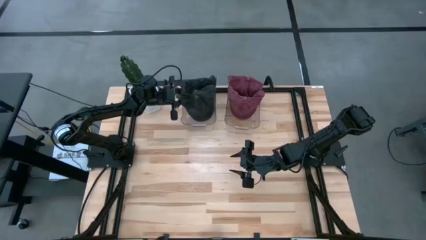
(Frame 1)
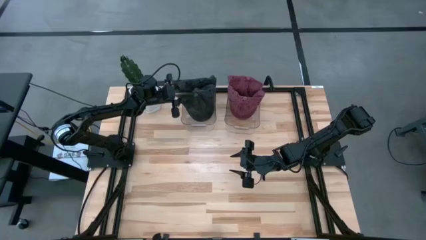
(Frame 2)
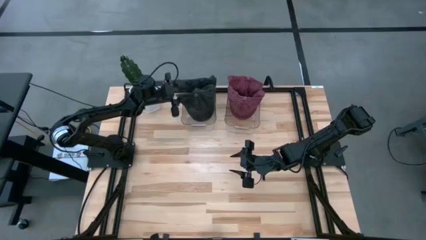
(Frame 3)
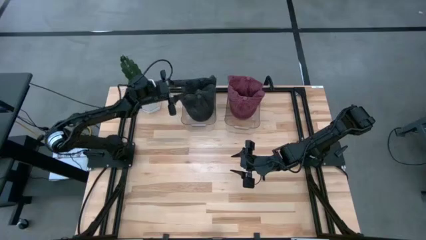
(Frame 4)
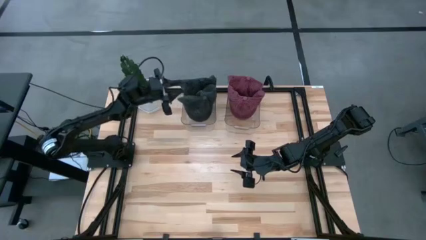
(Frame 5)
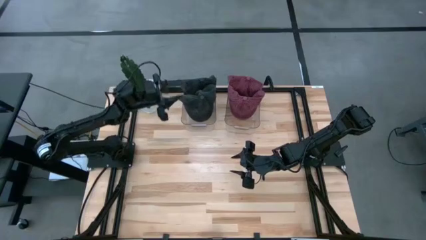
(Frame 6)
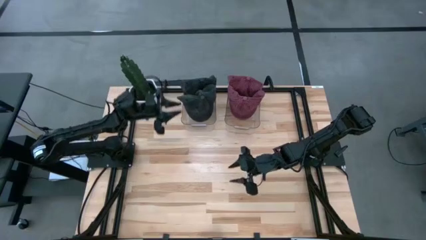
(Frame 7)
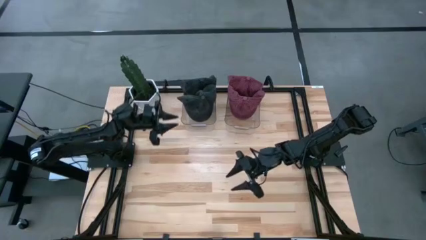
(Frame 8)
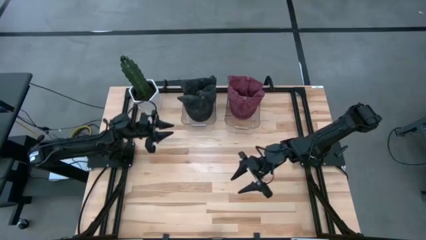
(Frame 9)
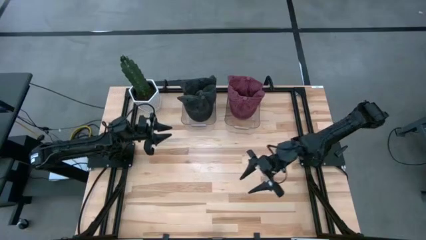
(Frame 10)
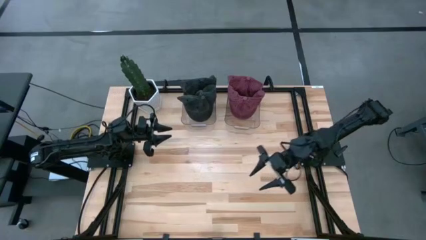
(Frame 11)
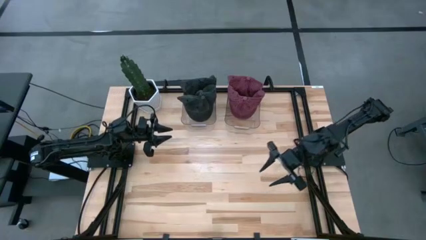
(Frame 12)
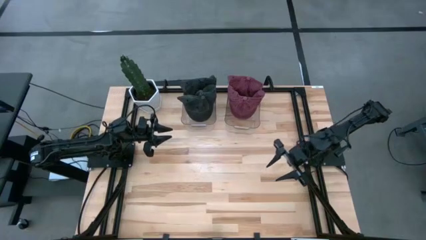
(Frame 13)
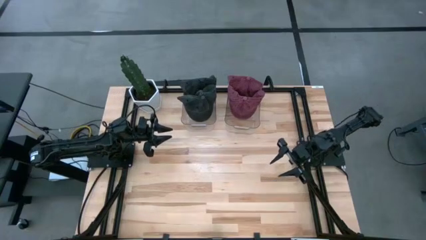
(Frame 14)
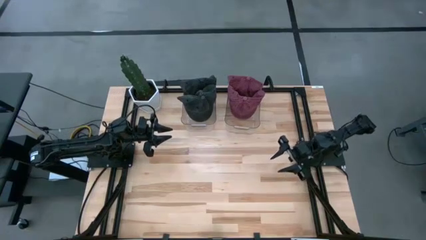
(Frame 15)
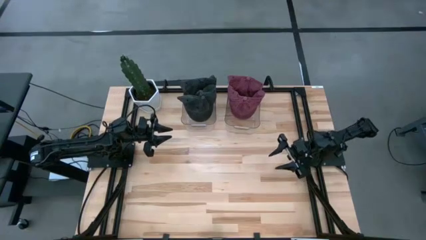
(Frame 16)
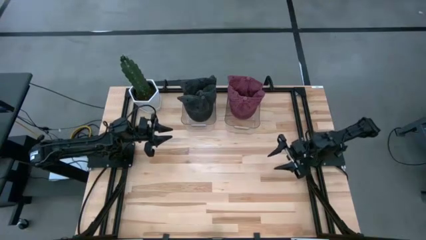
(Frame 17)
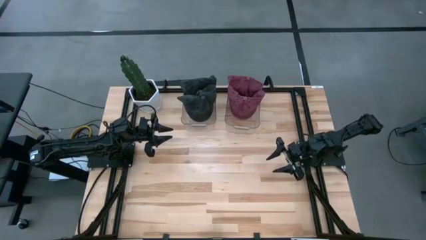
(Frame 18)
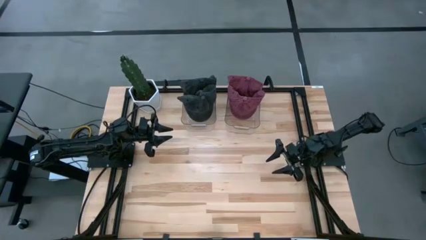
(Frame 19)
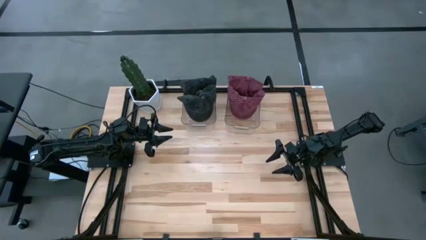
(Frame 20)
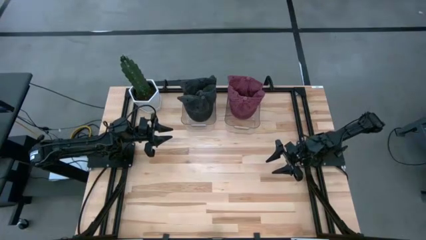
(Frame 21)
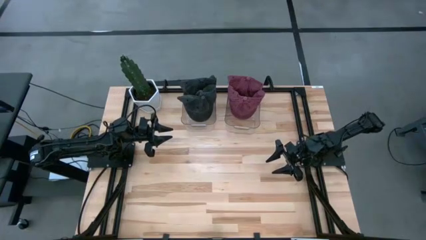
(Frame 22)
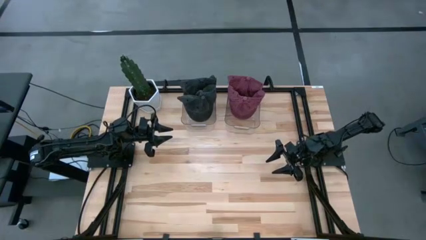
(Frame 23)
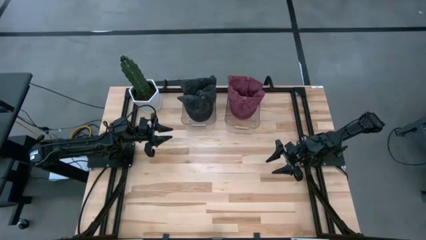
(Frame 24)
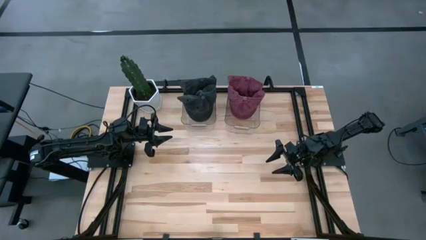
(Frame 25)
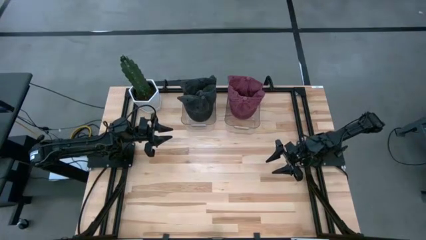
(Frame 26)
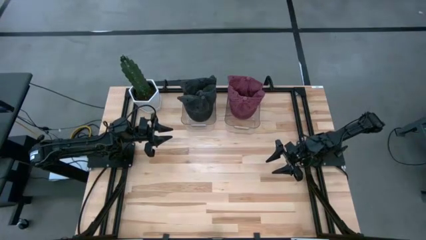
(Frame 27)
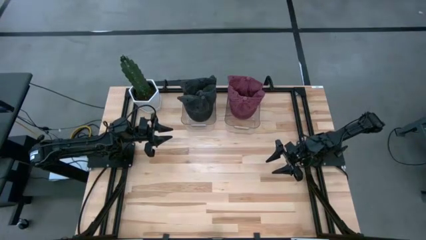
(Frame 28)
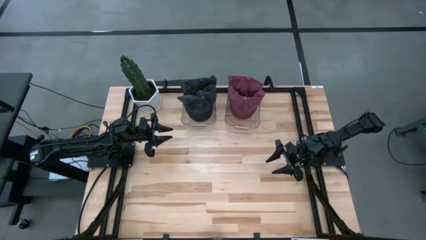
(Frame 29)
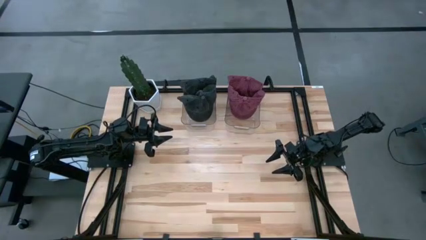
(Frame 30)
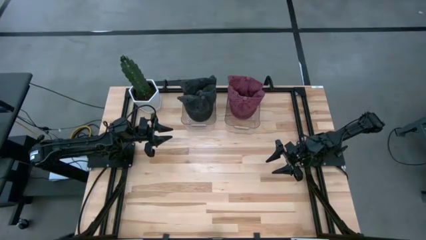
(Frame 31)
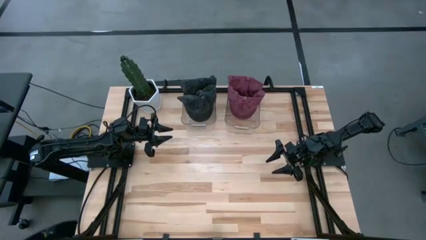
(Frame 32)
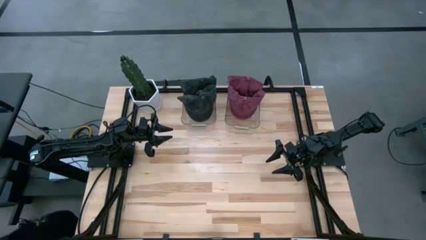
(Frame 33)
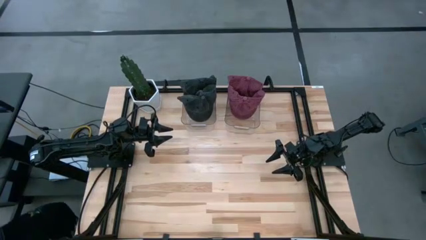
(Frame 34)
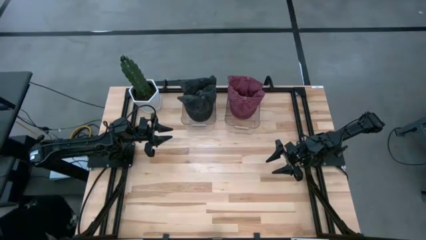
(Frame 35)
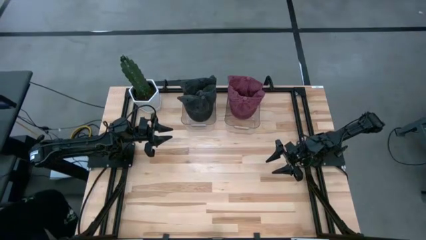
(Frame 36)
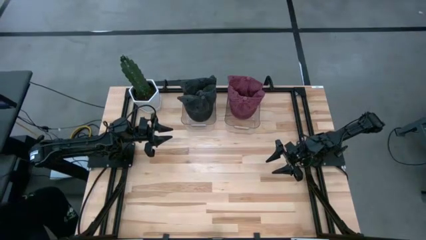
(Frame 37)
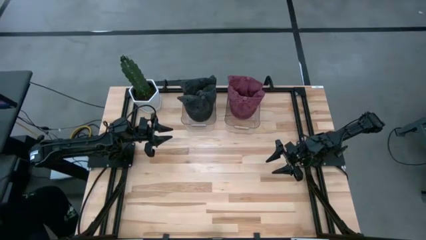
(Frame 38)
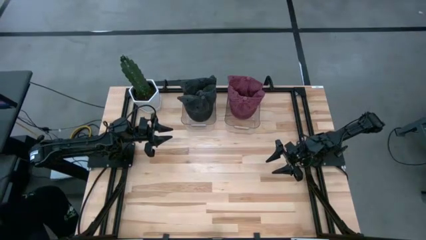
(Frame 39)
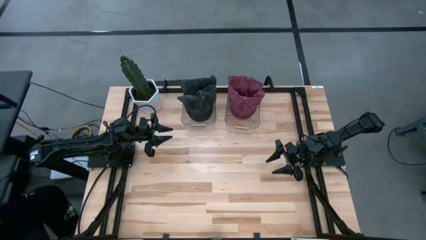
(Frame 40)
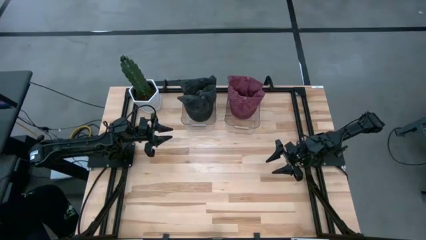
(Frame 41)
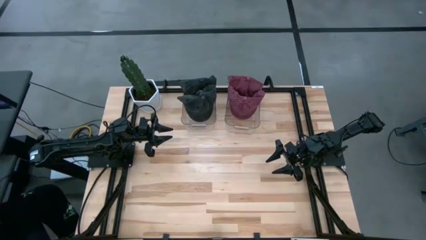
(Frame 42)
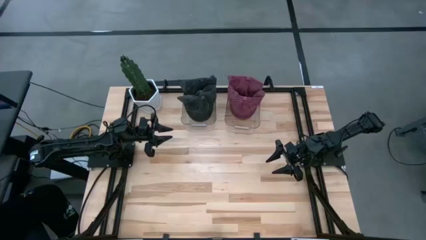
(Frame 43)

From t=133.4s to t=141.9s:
Task: Pick & Place hat
Return to Home Position

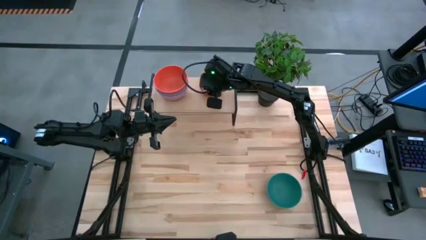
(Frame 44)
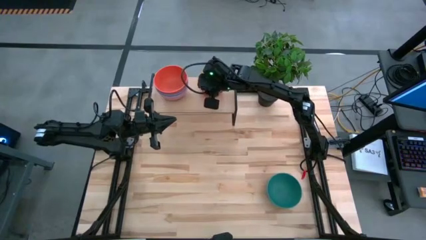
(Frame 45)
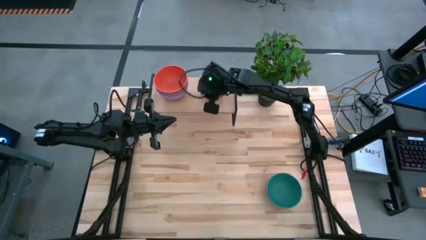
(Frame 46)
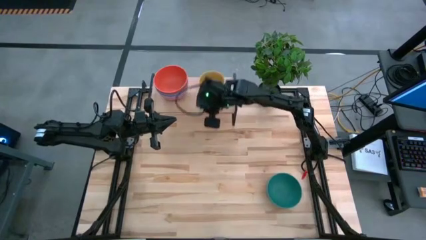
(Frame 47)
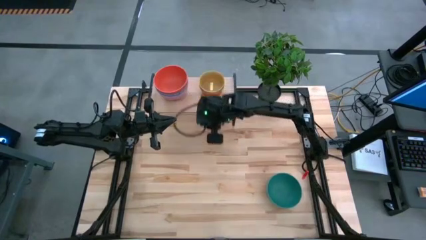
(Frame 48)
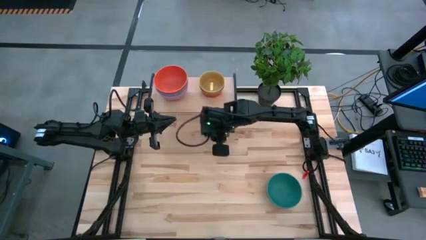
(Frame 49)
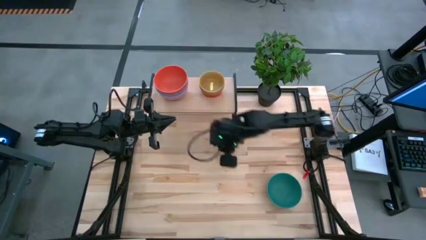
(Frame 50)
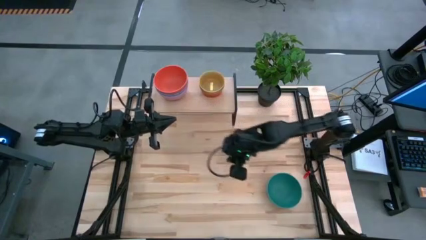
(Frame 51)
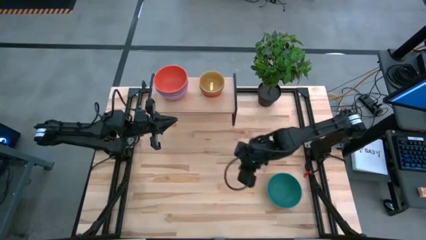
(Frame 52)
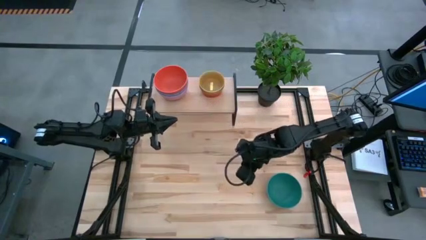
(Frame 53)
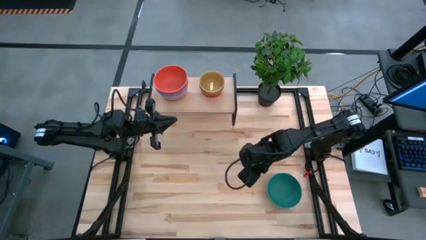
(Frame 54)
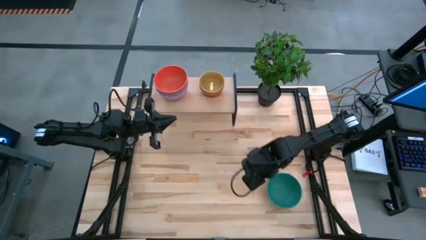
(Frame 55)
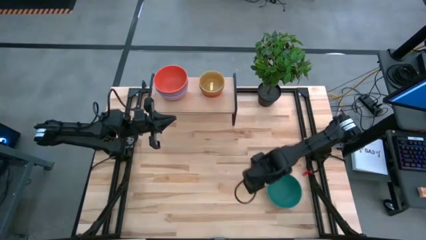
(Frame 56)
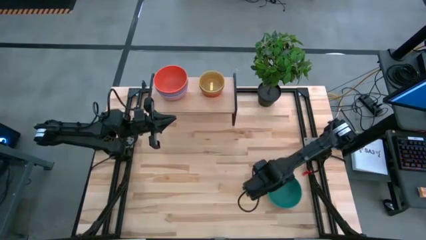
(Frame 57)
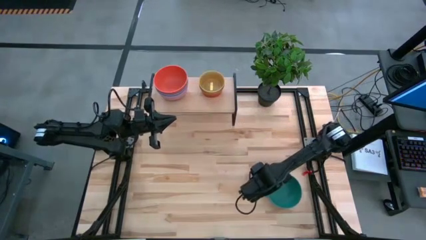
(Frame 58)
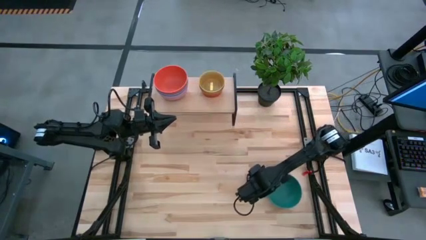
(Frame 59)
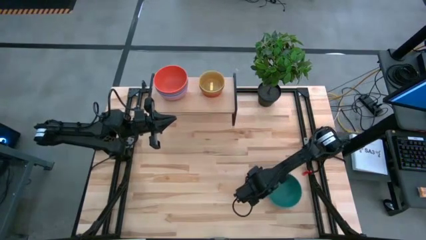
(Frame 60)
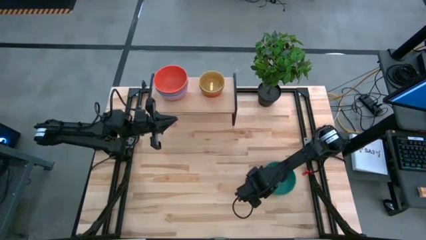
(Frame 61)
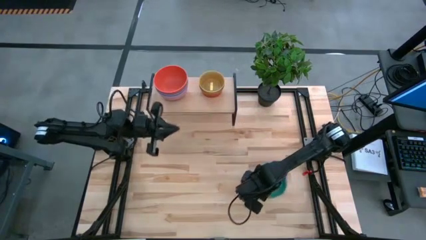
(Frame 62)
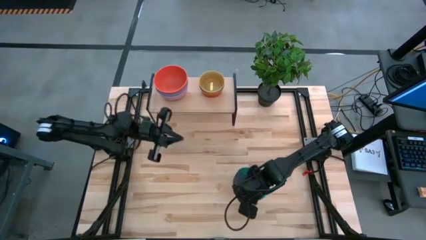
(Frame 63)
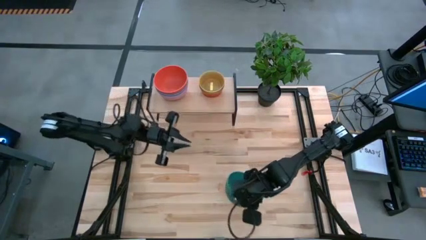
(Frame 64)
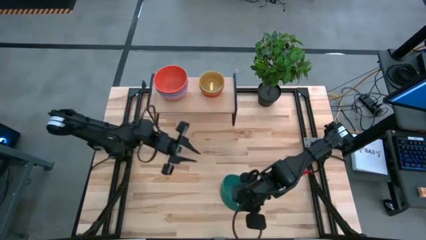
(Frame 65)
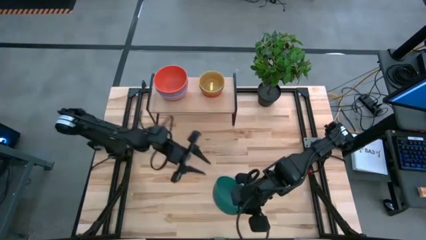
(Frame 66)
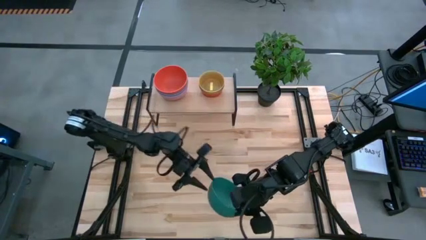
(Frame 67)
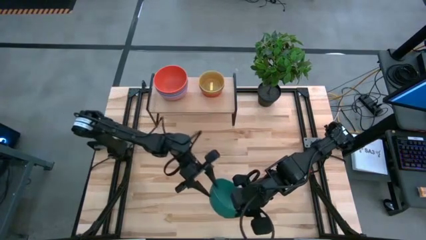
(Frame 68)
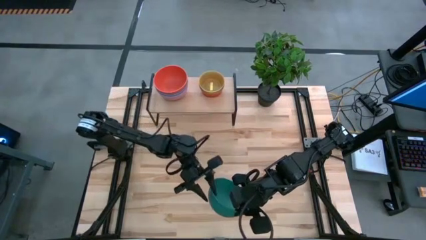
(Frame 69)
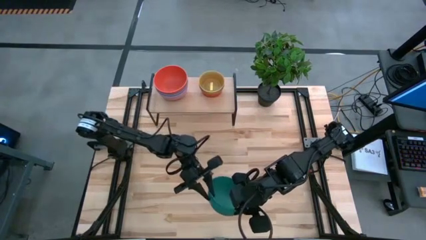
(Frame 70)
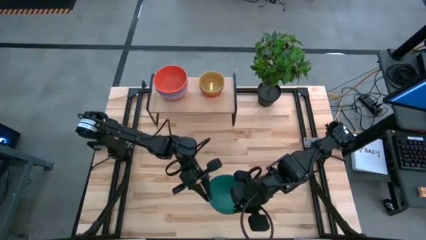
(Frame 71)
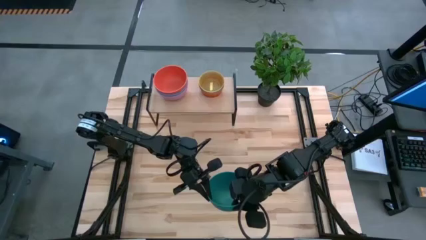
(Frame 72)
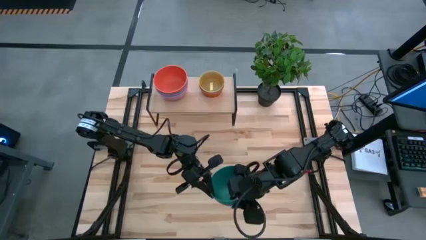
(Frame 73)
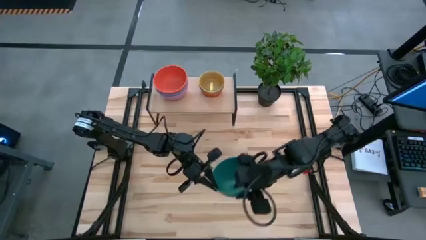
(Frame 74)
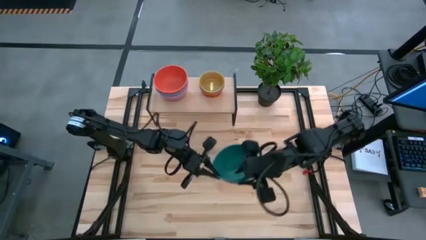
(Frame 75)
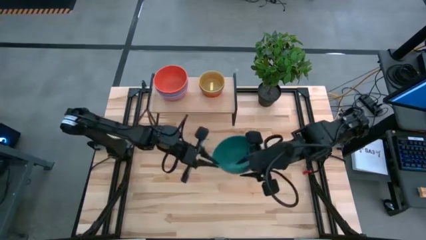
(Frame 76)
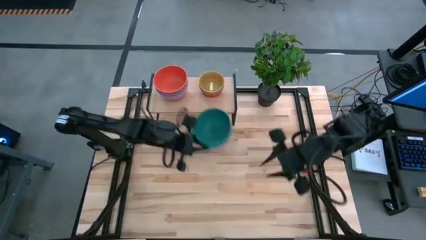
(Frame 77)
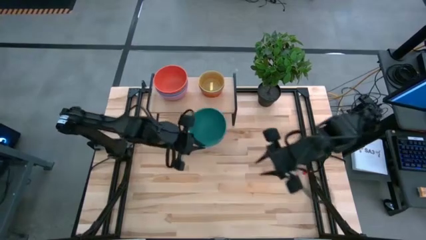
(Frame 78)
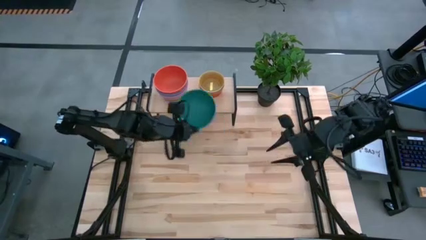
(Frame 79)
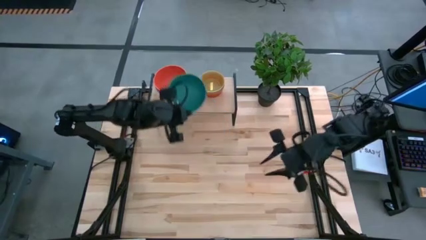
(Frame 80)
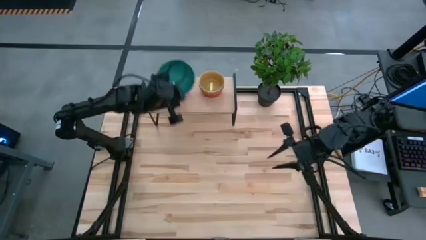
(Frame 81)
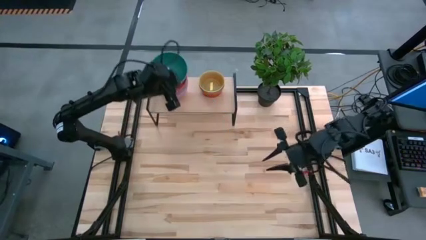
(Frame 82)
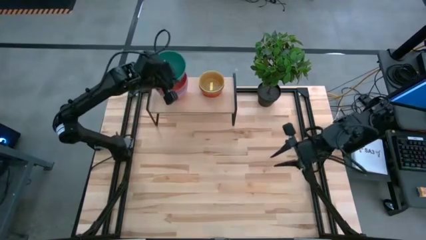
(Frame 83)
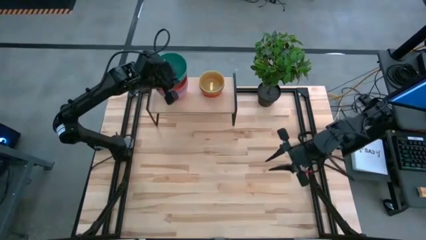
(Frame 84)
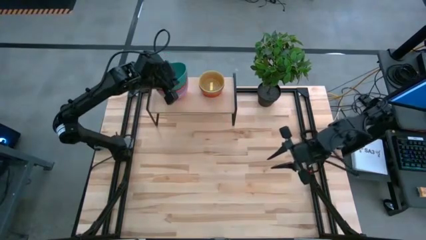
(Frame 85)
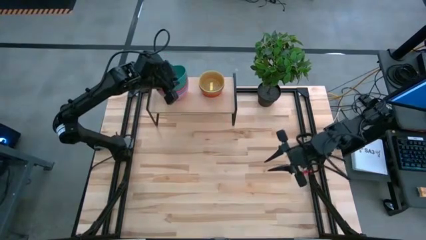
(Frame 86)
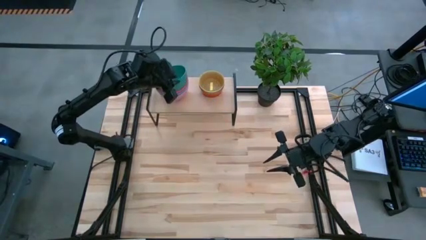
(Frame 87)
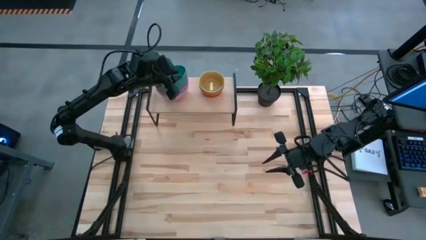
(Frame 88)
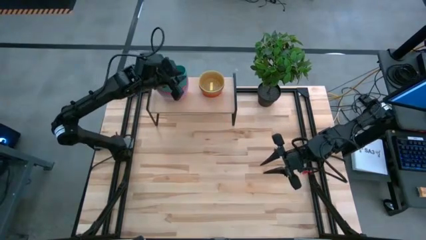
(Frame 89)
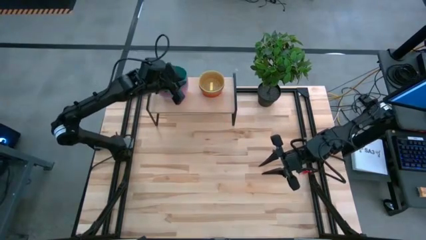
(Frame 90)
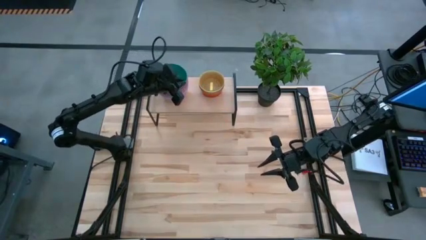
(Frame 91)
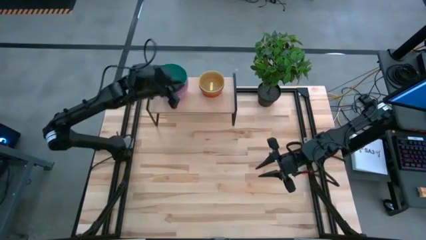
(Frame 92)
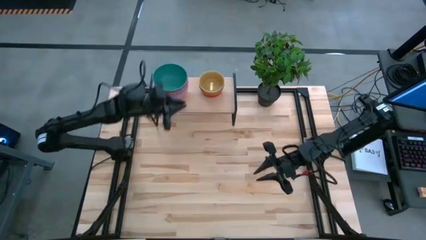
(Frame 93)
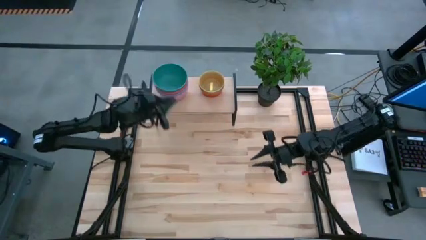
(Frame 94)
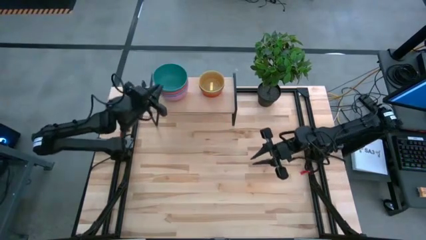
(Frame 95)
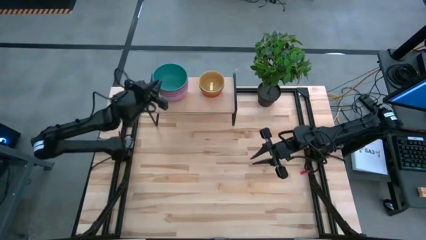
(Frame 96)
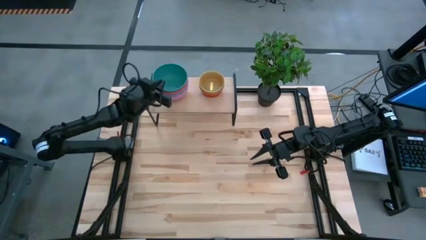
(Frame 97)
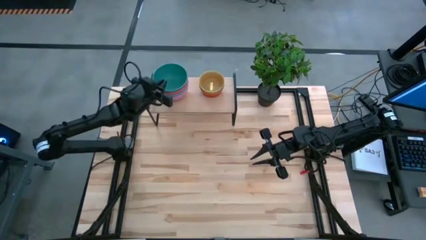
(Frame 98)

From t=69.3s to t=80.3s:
Task: Place and stack bowls onto a shelf
Stack the big green bowl on top of the big orange bowl on the shelf
